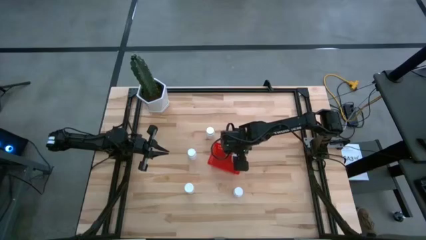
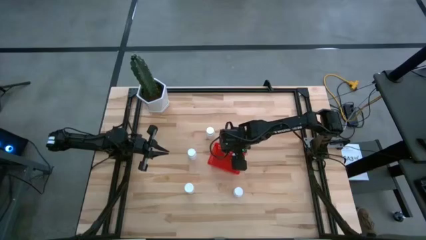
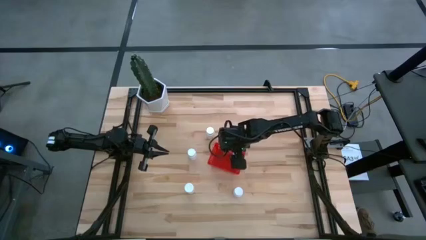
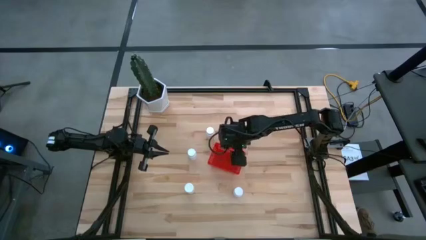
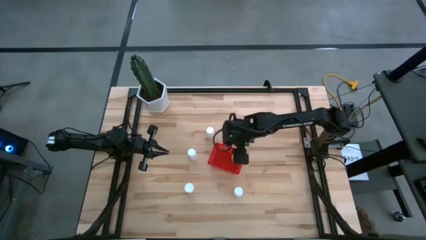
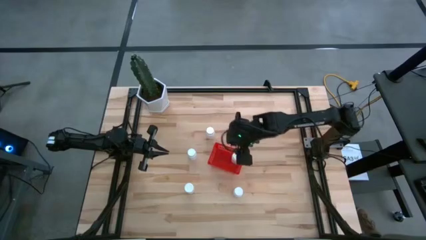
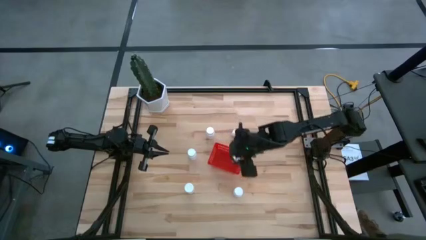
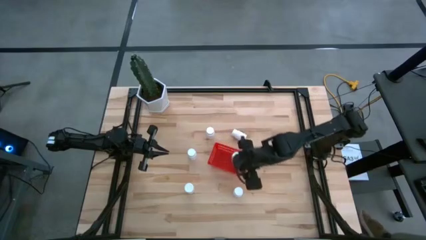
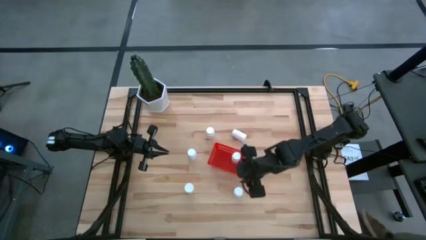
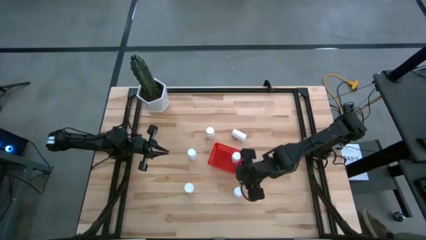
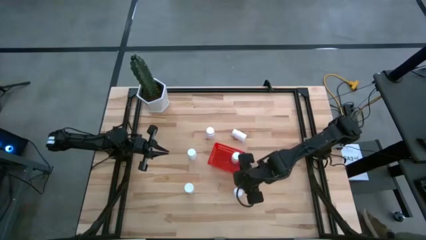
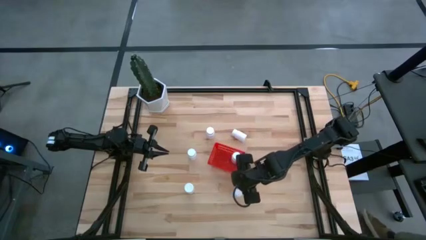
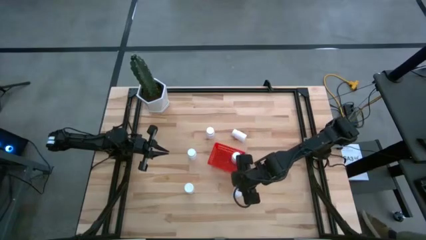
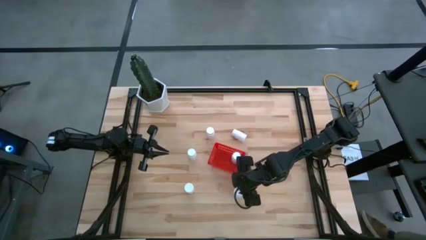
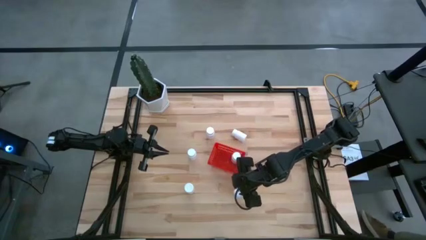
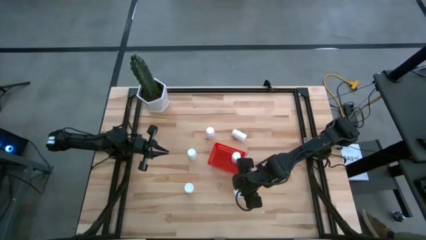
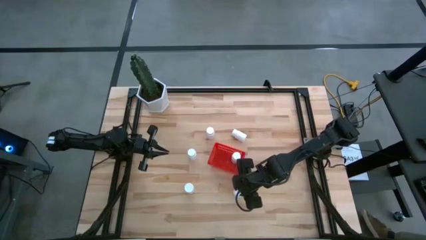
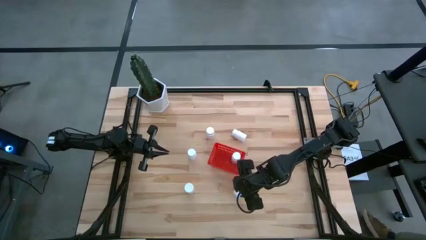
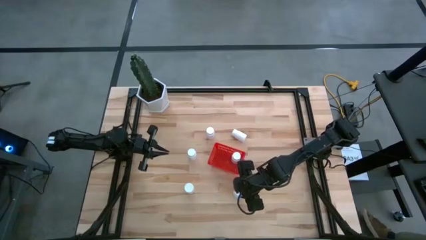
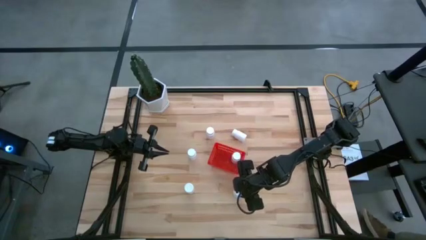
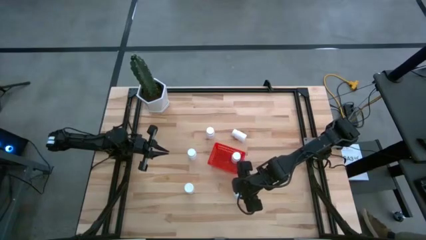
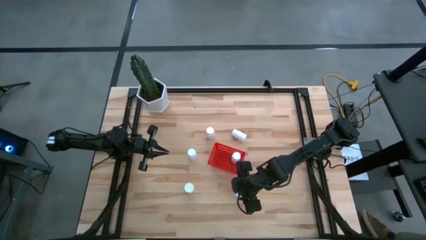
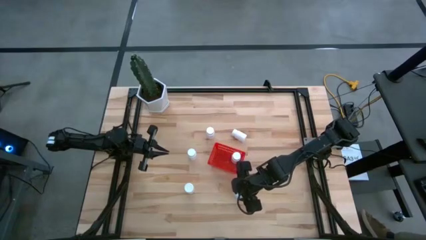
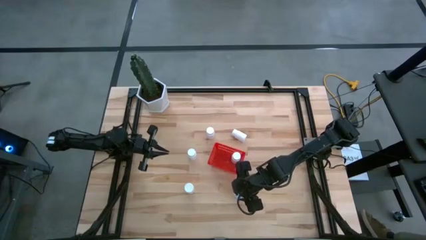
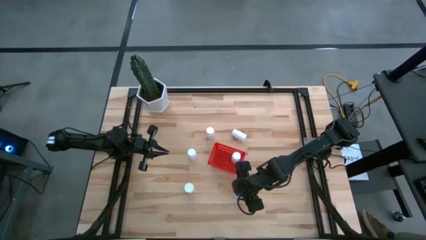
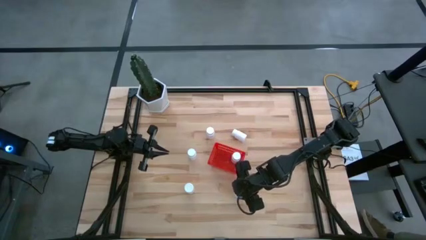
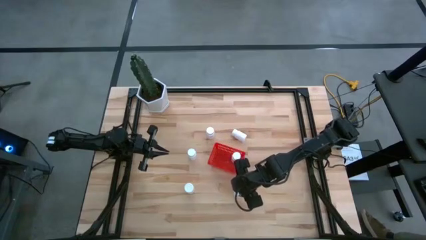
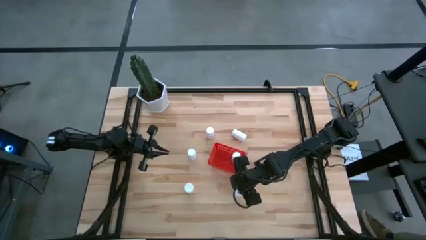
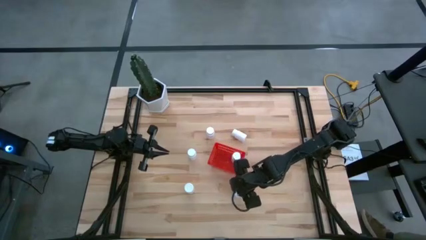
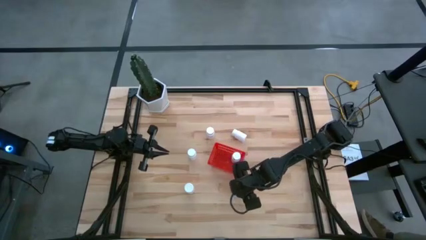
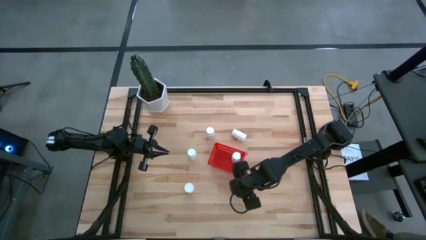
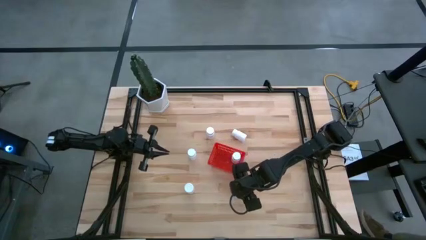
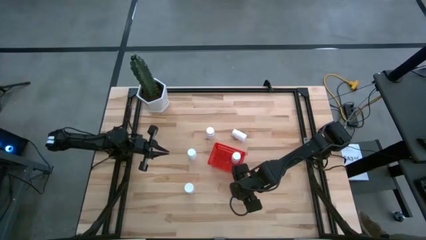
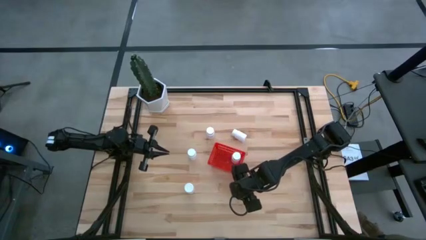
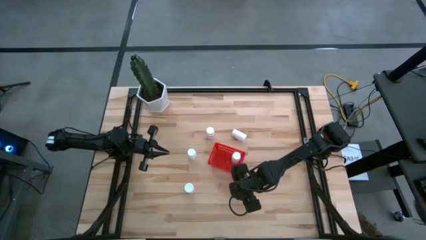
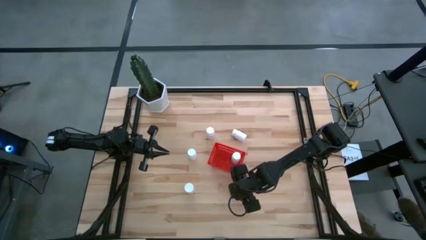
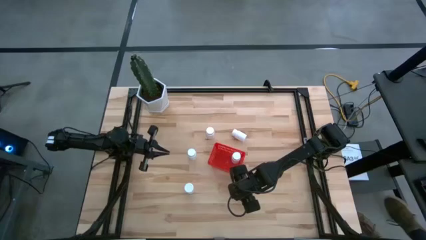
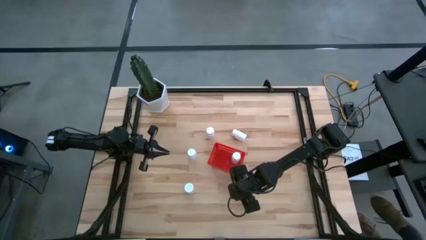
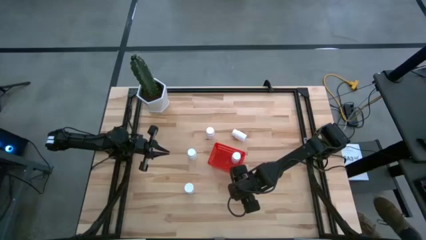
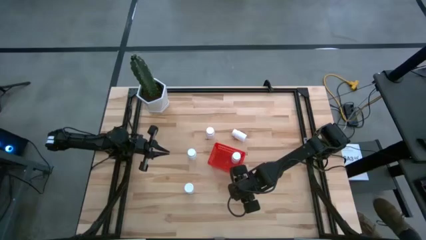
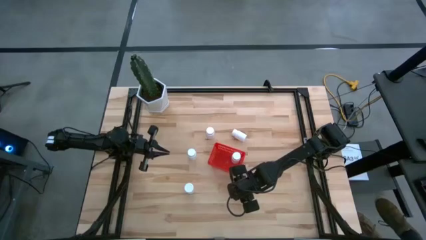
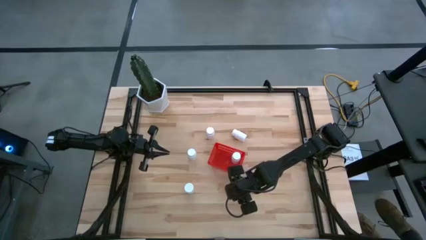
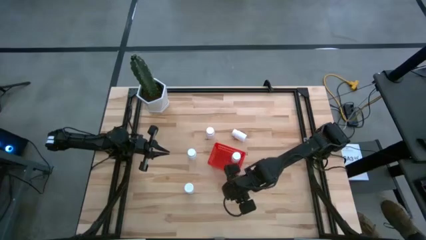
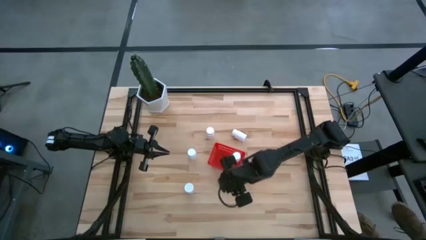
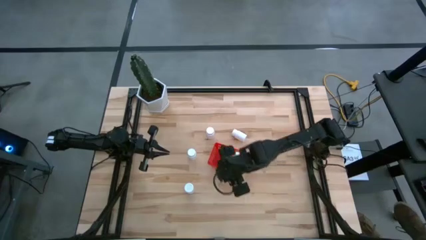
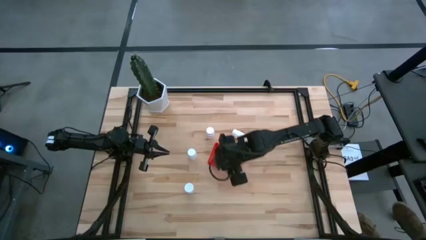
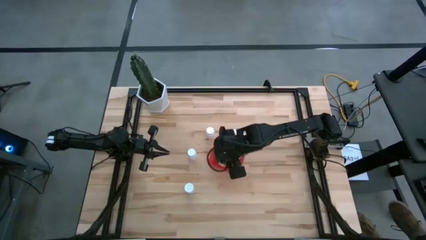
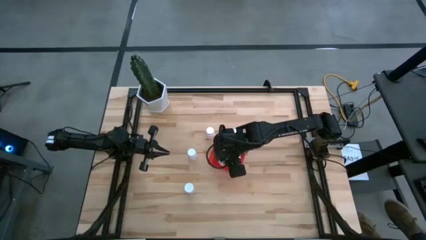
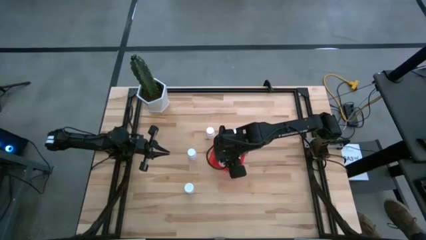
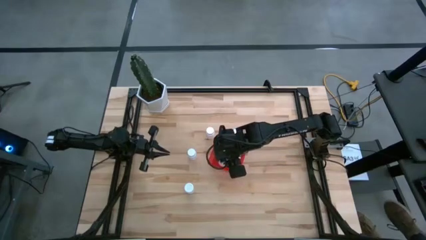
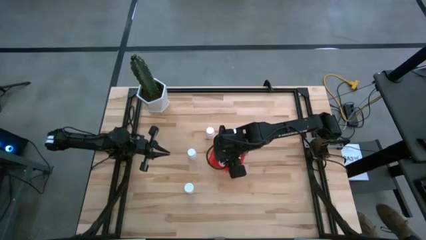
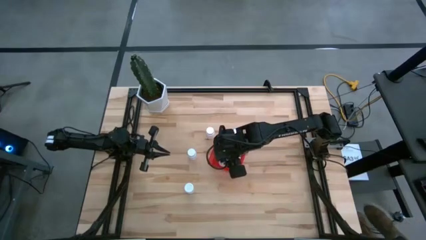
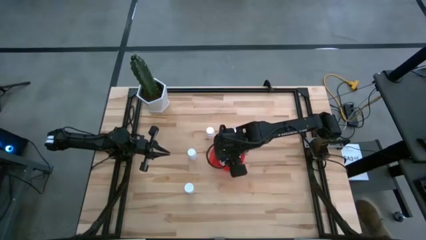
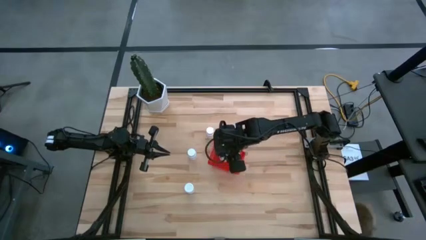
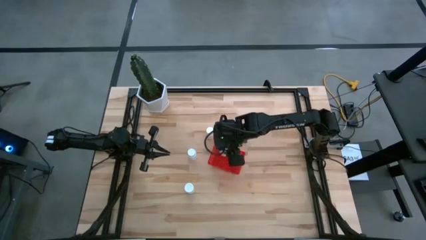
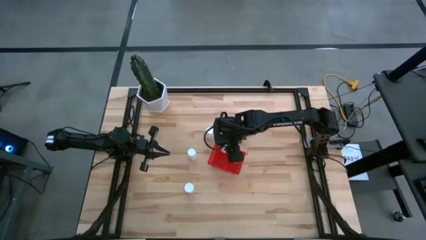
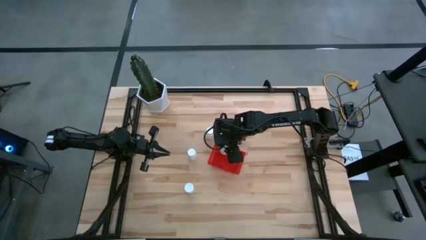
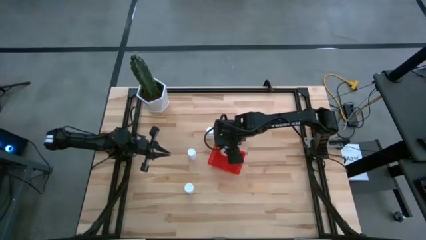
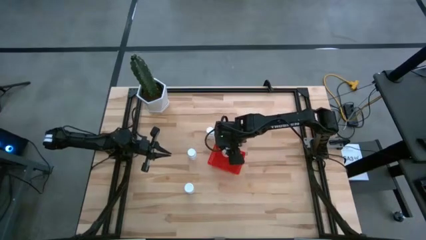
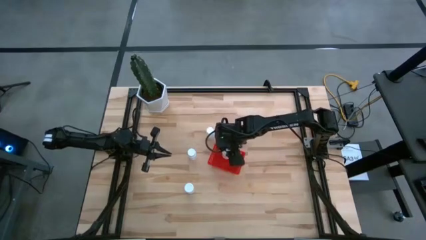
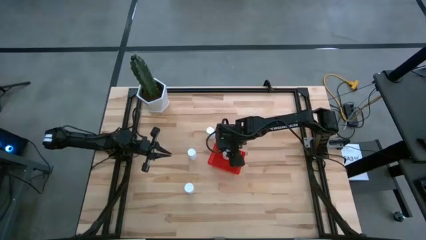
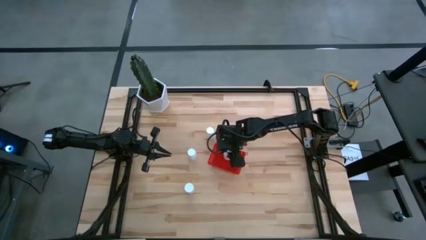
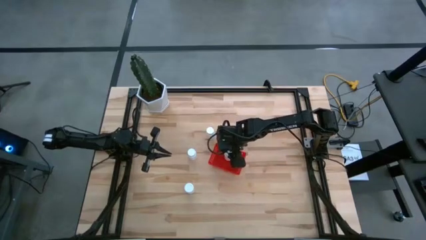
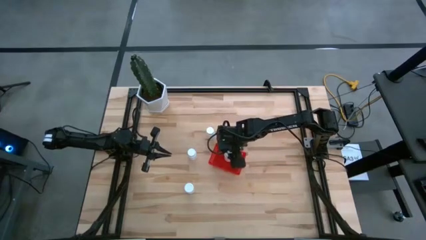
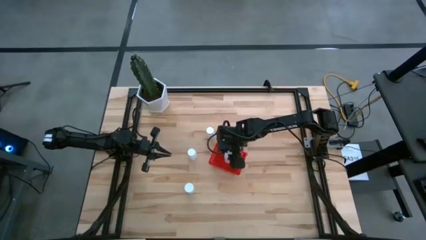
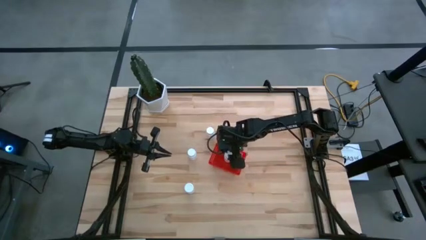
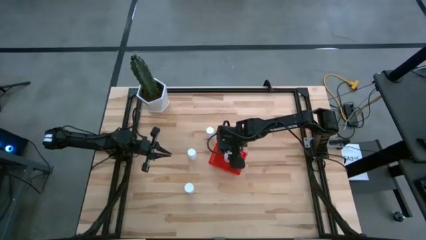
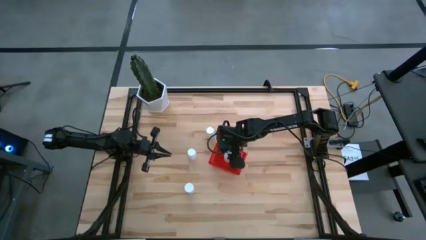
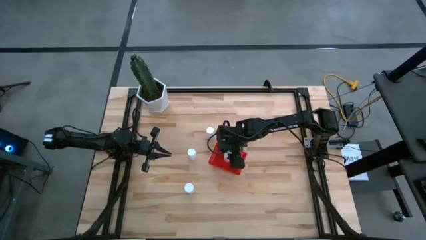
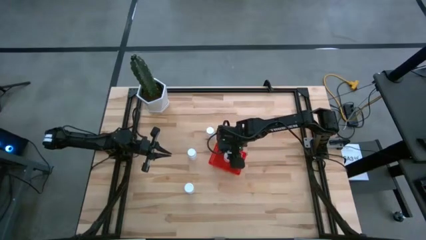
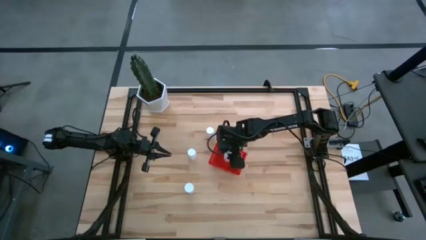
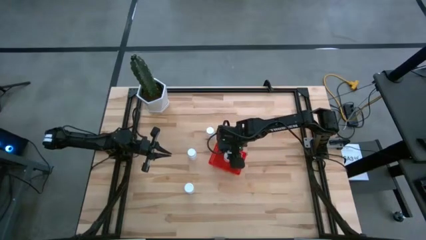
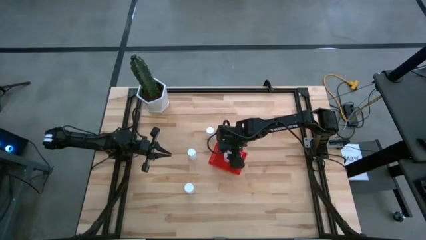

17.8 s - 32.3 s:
Task: Pick and place pill bottles into a basket
Put the white pill bottle into the red bin
